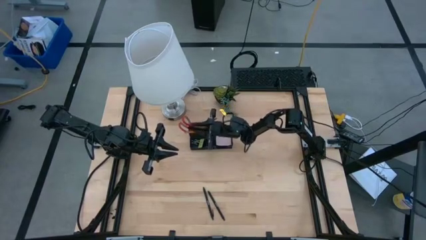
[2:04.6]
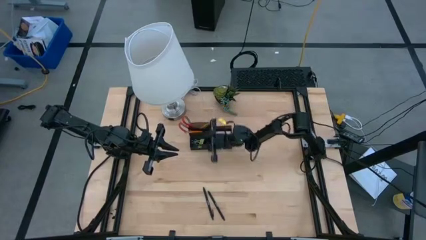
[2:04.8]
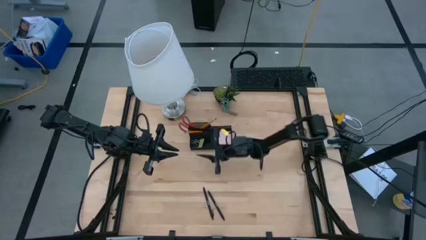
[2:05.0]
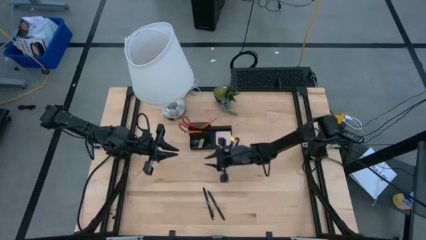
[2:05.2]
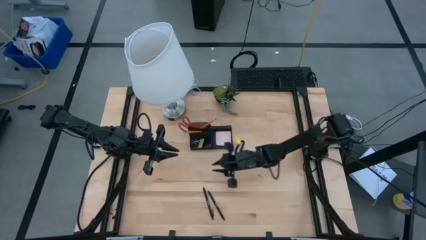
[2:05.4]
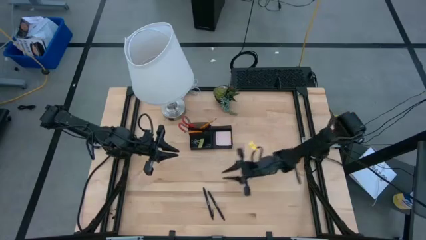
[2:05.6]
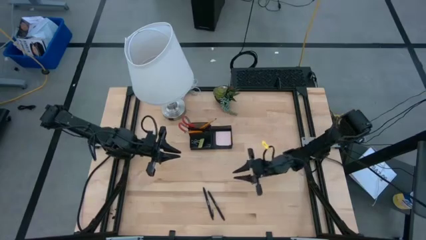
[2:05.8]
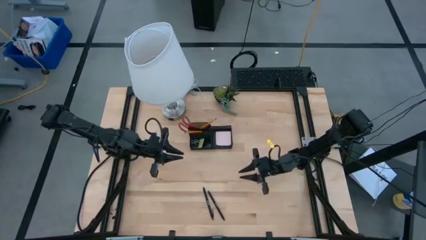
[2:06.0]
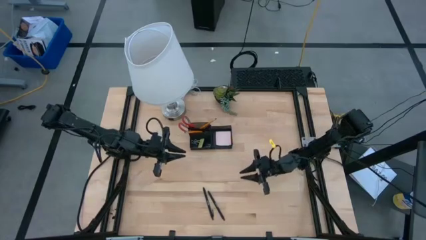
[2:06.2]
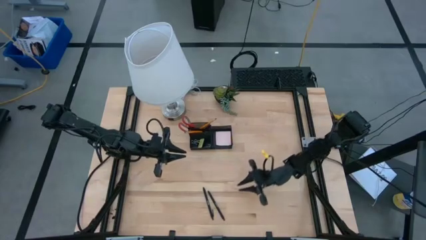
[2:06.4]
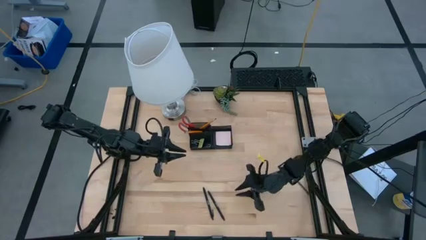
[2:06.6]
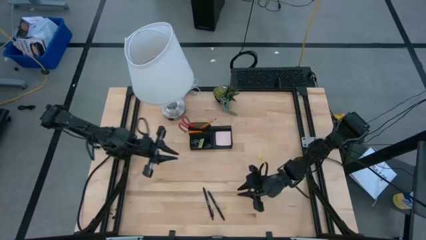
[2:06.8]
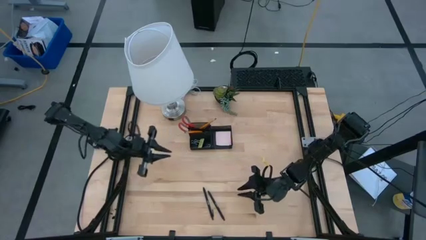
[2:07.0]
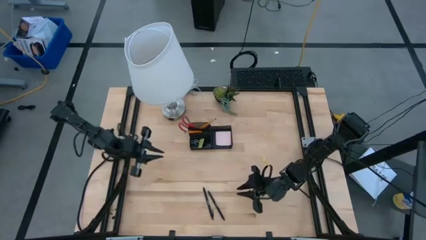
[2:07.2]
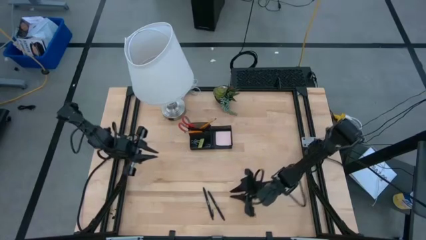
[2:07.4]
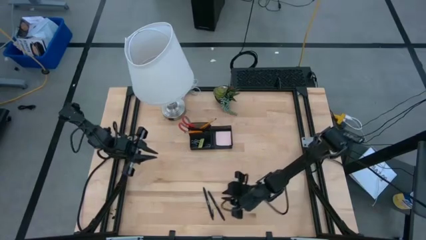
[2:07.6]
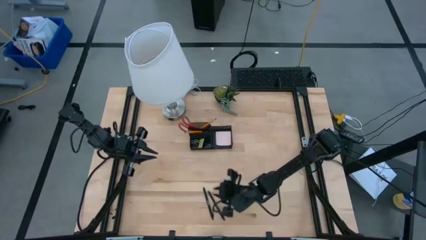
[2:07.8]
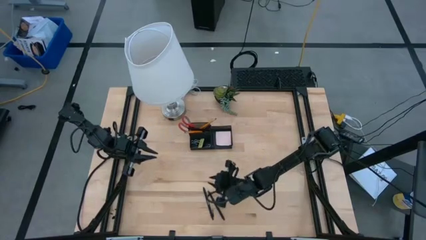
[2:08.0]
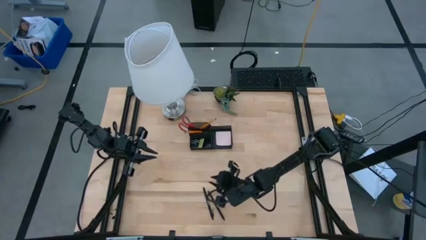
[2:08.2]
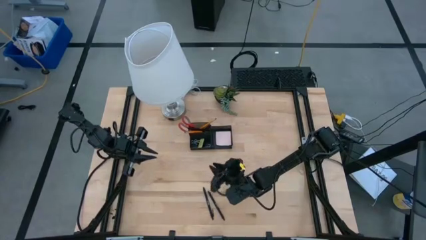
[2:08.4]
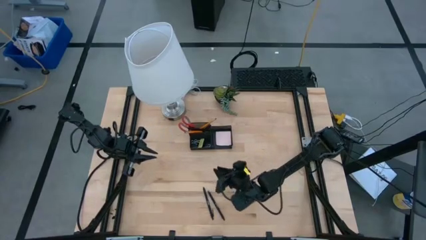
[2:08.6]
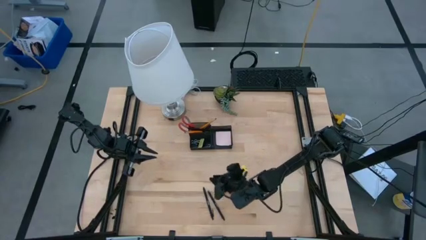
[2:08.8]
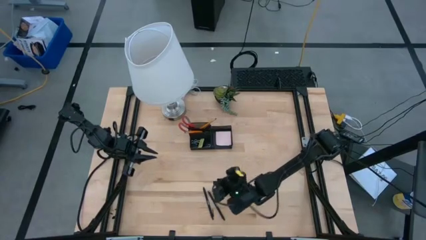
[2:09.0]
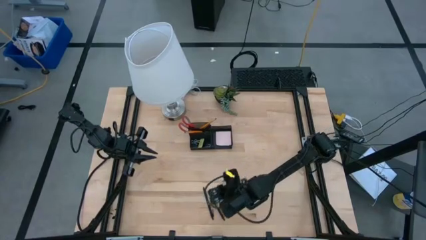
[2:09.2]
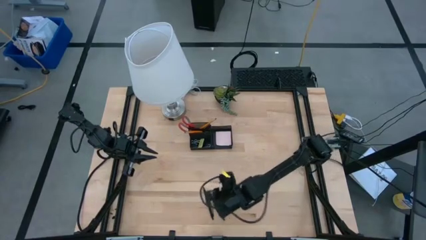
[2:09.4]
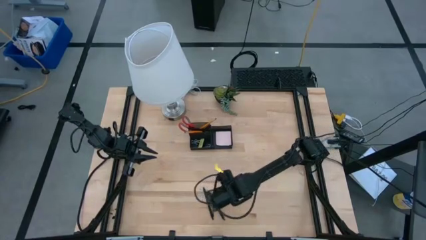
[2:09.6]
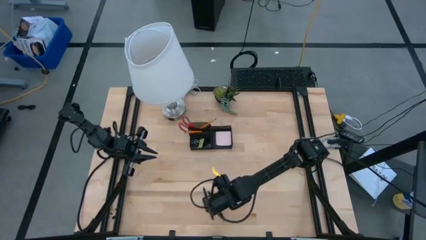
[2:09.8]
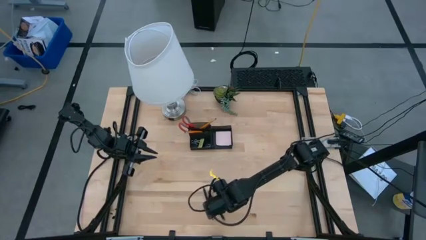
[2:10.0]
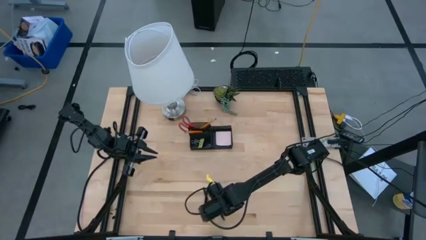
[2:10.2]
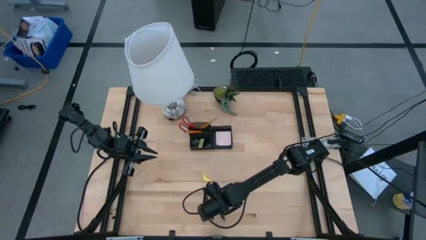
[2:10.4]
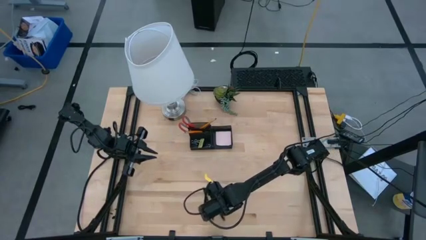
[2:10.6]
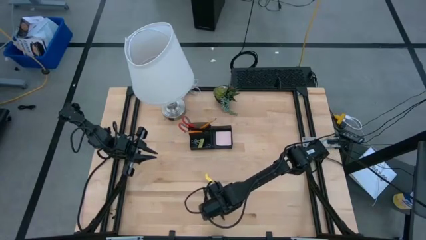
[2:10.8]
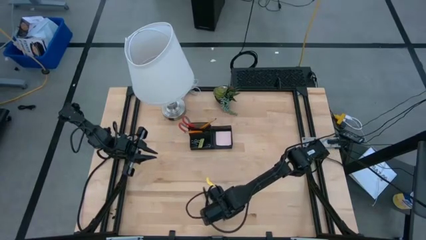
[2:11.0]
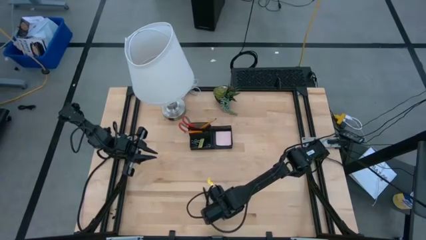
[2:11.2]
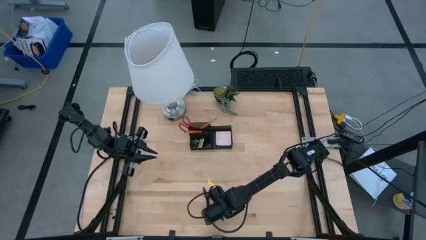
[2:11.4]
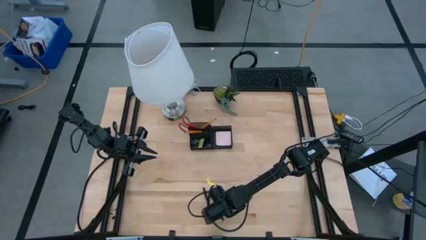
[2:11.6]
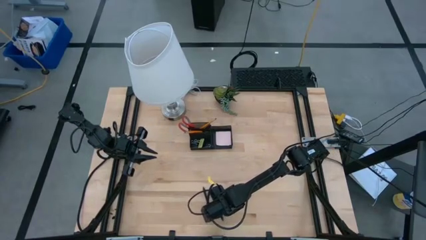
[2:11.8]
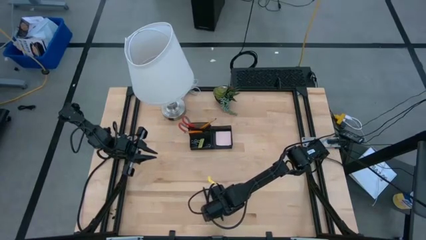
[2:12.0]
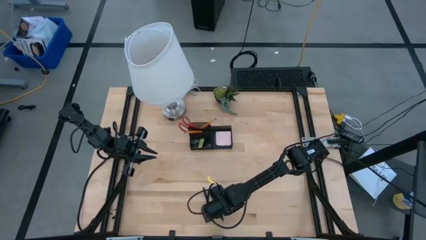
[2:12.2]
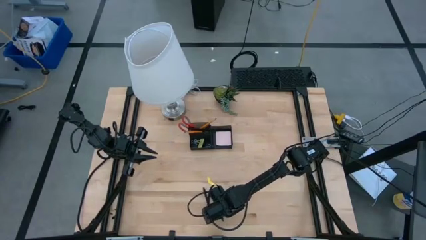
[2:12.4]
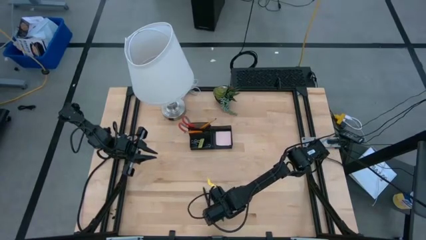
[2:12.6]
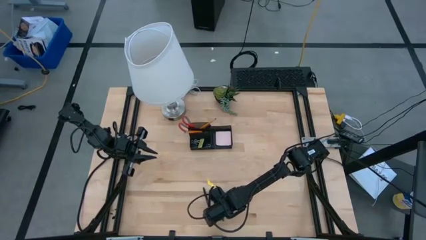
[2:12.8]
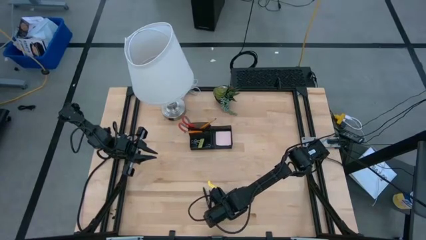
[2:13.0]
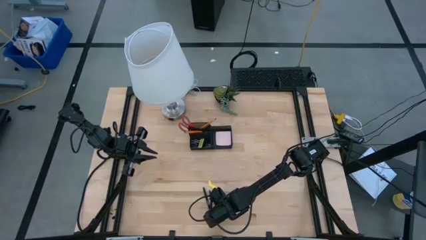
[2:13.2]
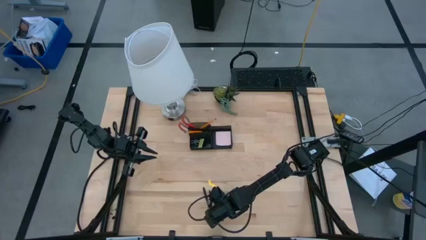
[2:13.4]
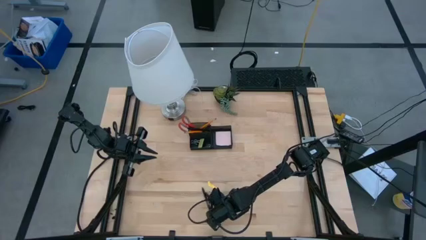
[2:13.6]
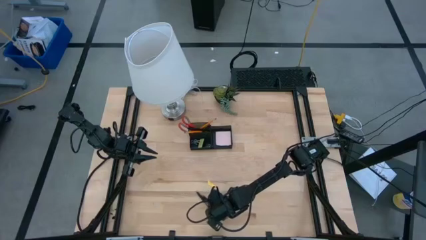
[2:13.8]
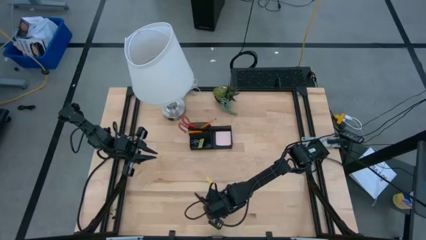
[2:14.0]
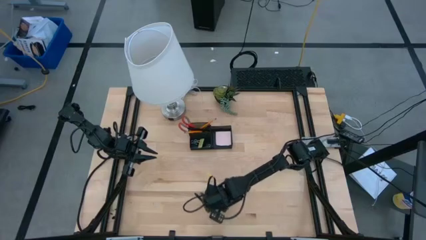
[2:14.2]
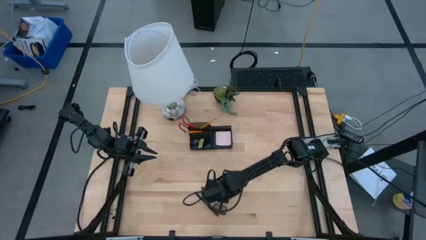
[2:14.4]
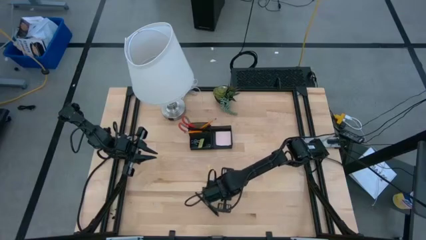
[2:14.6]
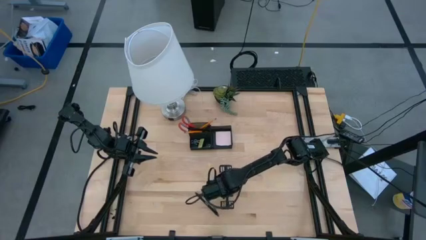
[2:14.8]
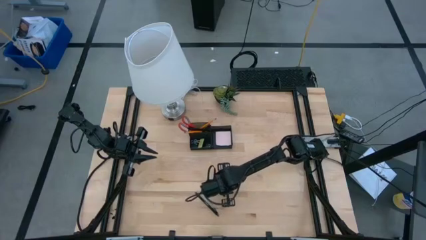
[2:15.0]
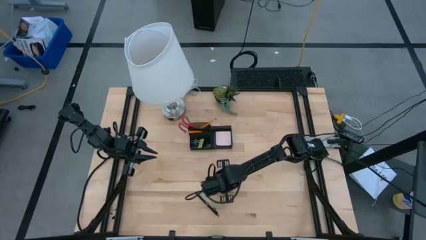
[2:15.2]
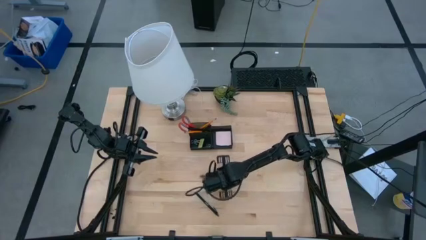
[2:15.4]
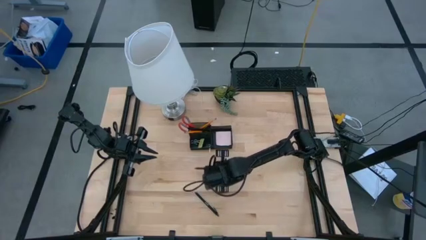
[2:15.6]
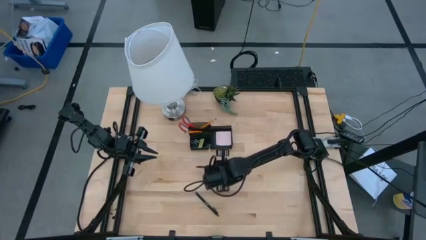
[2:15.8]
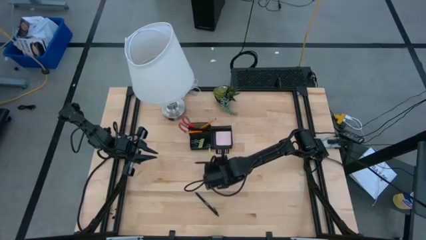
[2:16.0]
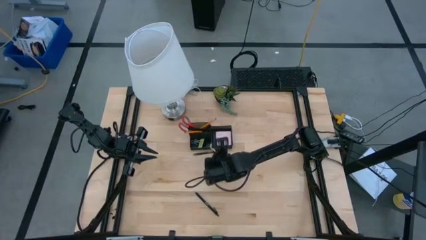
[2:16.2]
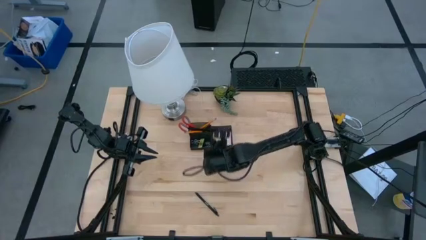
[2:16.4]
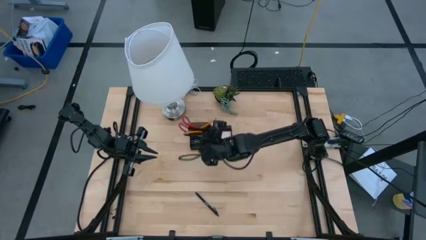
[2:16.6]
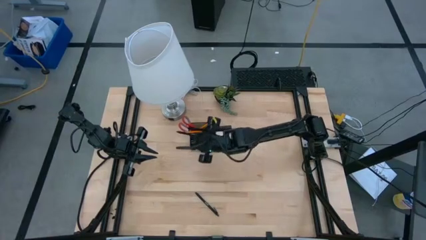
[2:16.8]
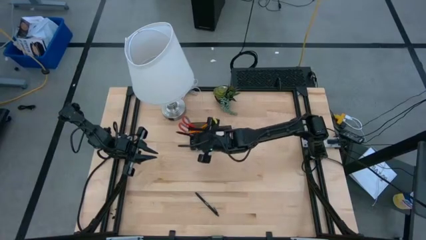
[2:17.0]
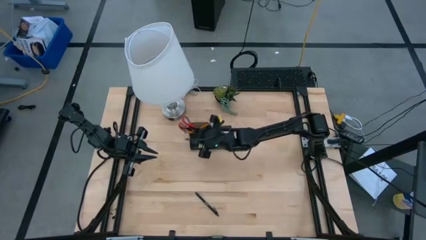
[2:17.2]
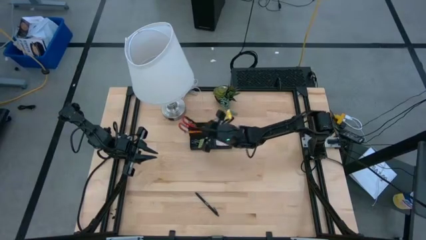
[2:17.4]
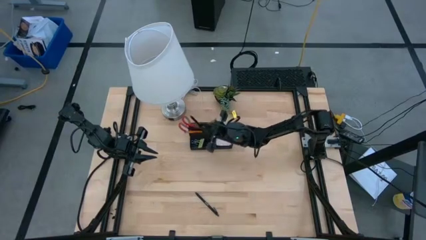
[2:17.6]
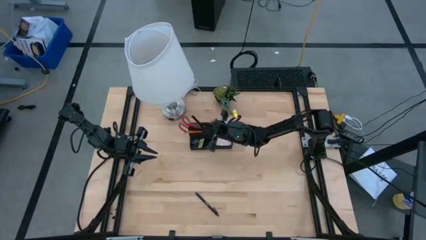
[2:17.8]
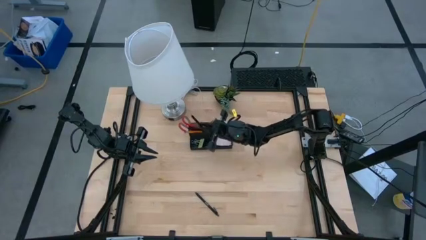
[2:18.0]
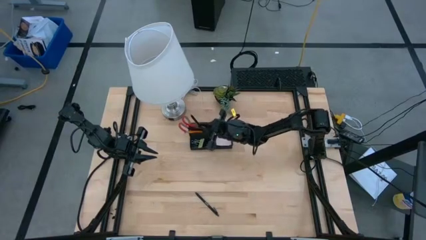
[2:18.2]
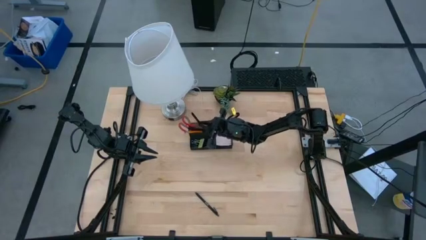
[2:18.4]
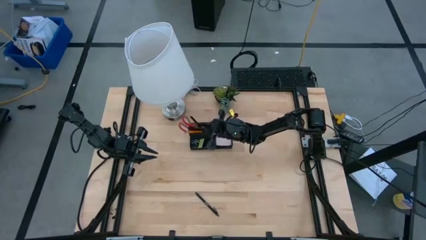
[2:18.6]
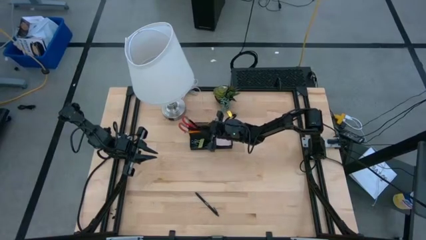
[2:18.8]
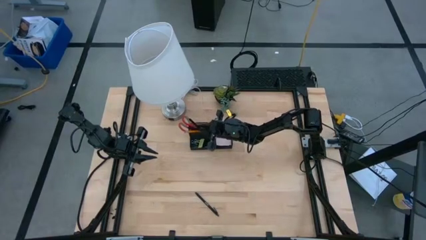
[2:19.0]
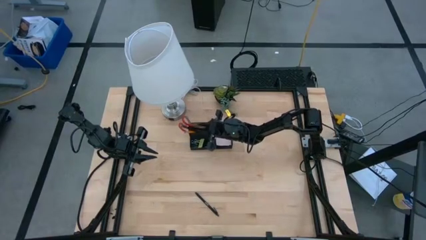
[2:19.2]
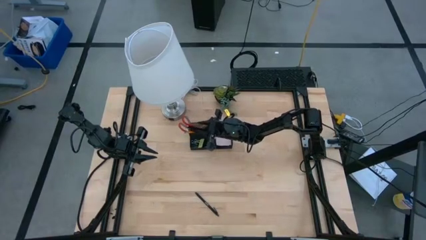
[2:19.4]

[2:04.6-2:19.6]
Task: Pick and place office supplies into organizer
Put the right black pen into the black desk organizer
